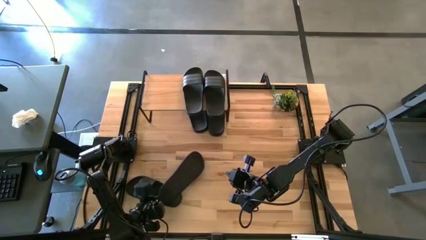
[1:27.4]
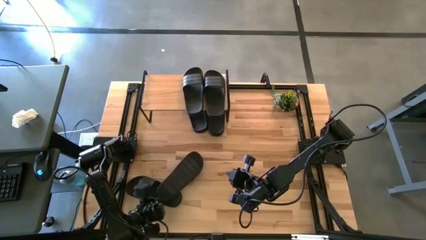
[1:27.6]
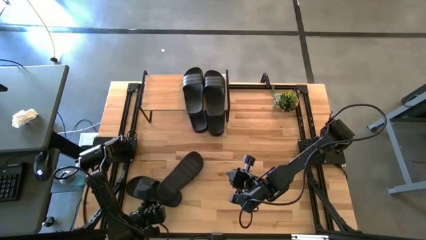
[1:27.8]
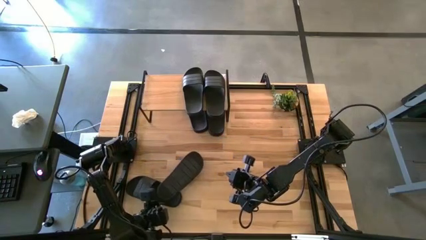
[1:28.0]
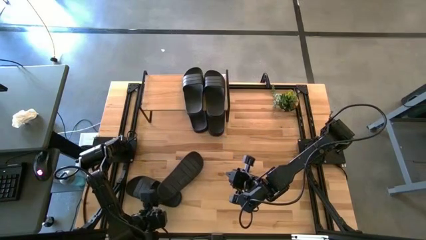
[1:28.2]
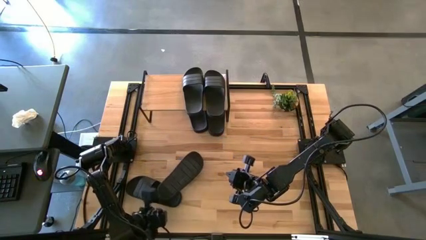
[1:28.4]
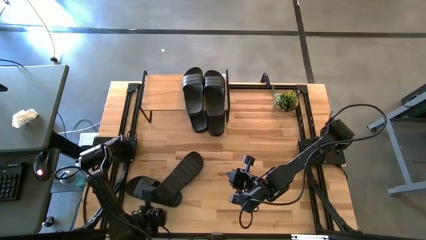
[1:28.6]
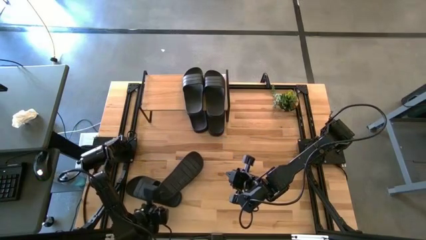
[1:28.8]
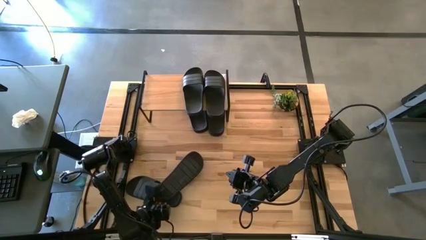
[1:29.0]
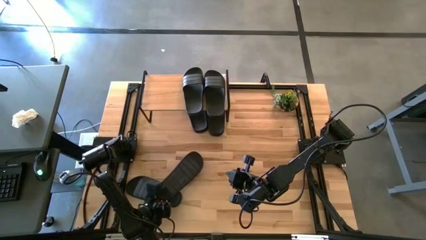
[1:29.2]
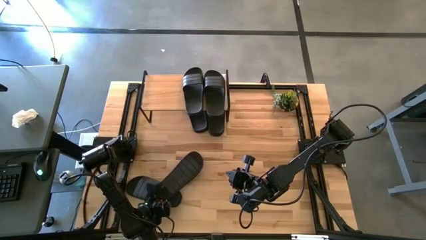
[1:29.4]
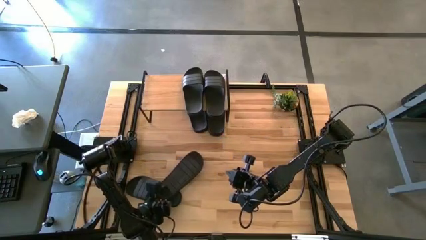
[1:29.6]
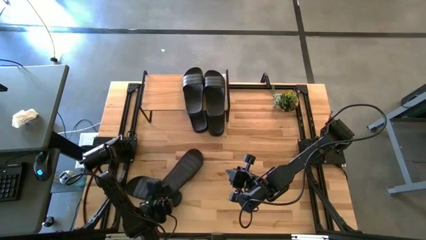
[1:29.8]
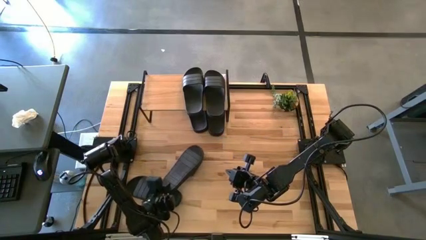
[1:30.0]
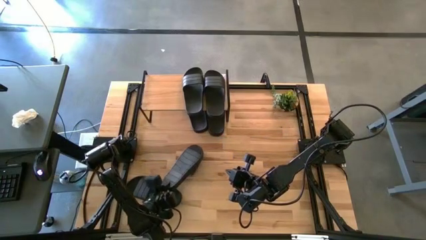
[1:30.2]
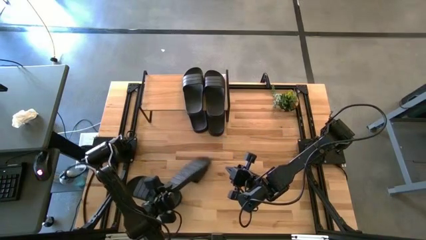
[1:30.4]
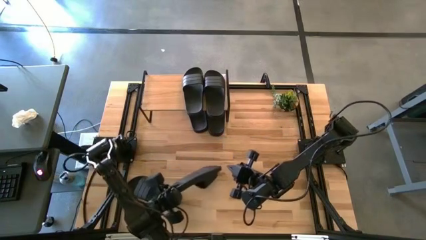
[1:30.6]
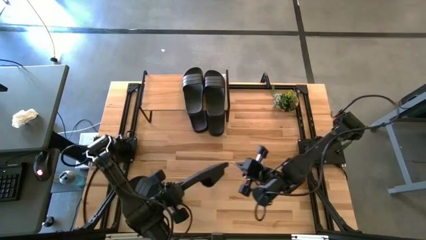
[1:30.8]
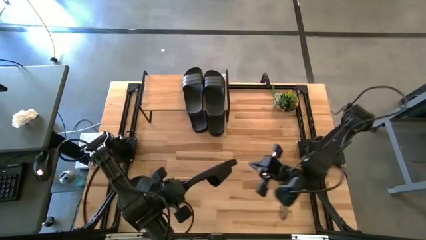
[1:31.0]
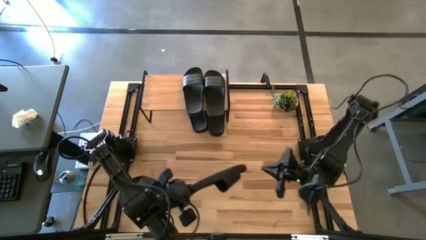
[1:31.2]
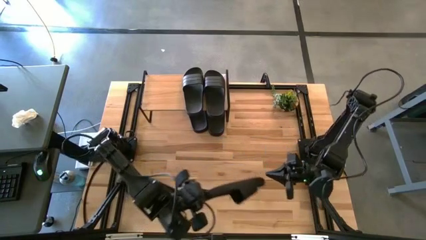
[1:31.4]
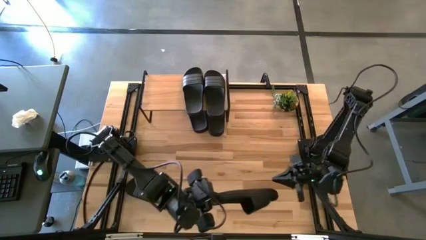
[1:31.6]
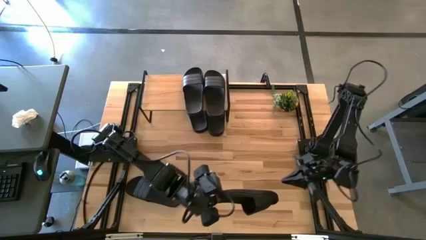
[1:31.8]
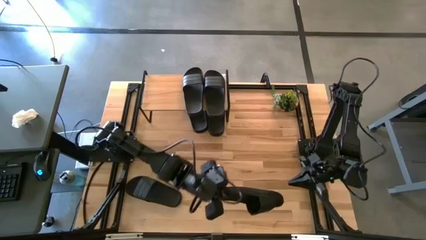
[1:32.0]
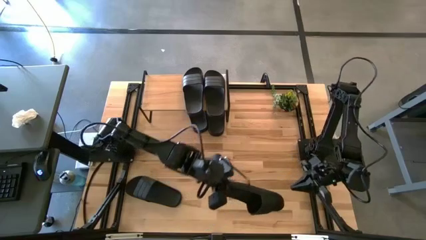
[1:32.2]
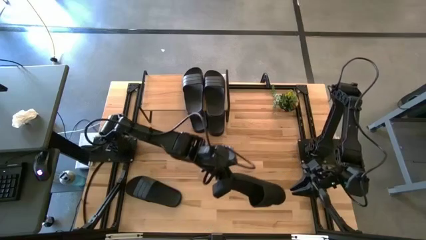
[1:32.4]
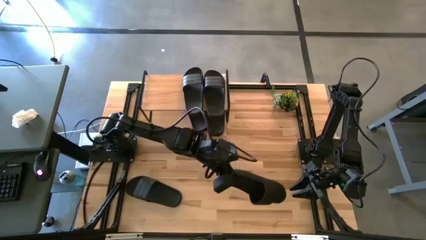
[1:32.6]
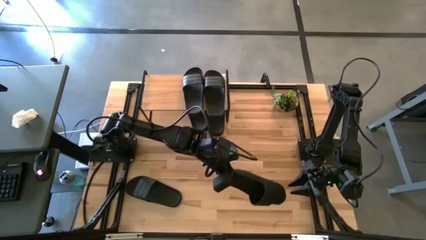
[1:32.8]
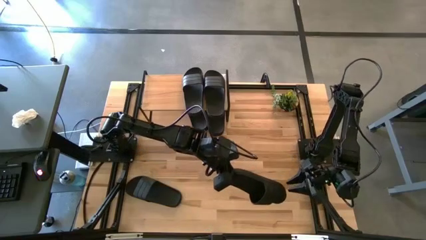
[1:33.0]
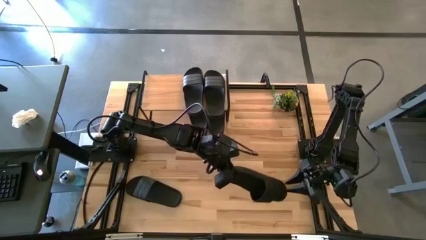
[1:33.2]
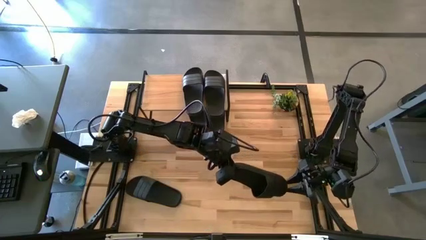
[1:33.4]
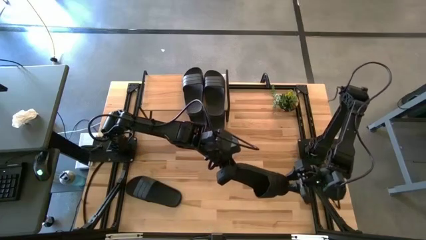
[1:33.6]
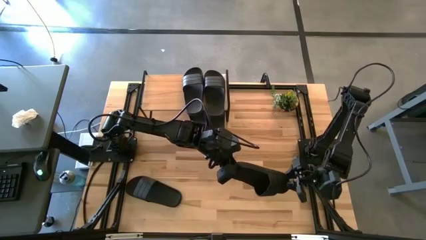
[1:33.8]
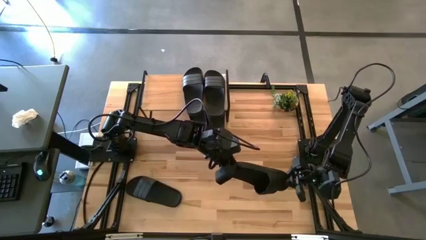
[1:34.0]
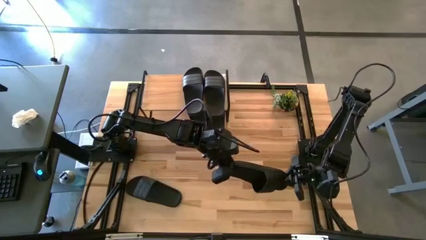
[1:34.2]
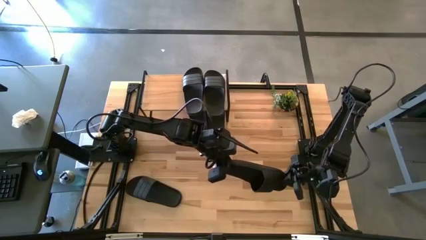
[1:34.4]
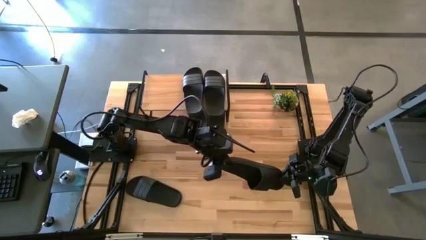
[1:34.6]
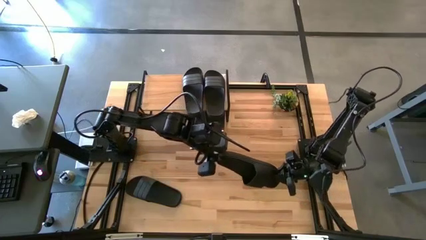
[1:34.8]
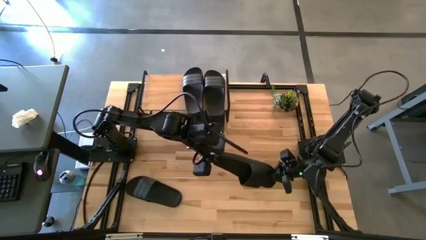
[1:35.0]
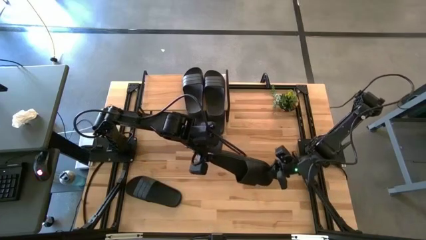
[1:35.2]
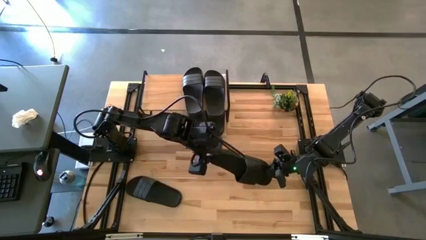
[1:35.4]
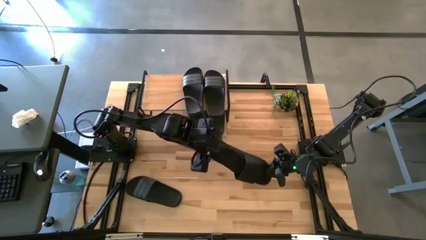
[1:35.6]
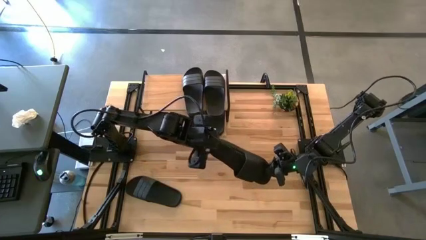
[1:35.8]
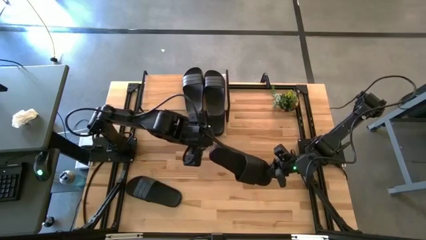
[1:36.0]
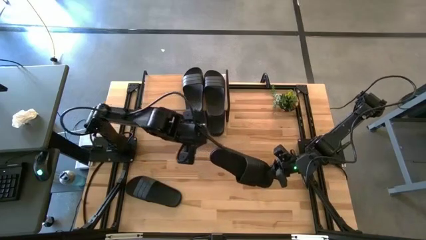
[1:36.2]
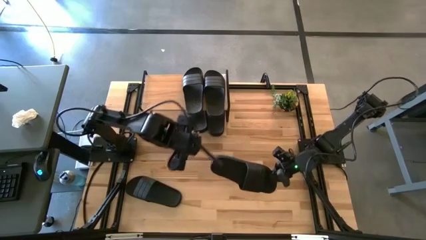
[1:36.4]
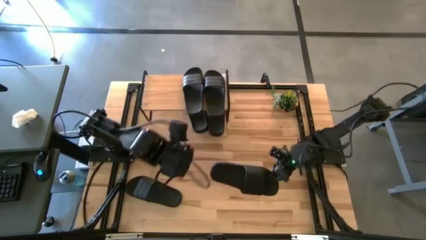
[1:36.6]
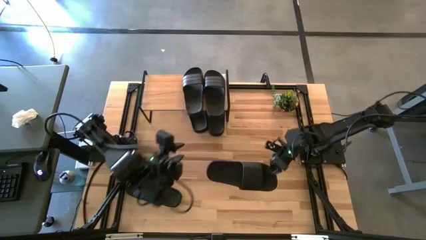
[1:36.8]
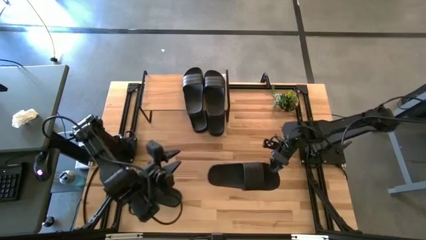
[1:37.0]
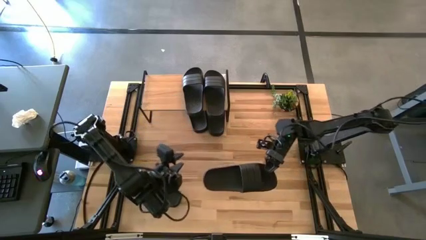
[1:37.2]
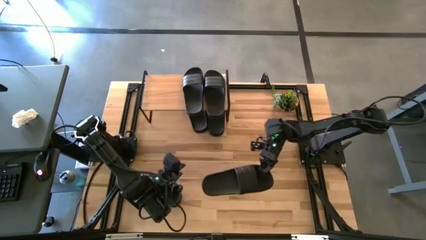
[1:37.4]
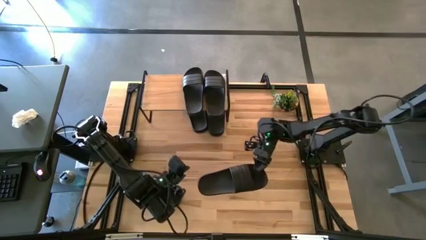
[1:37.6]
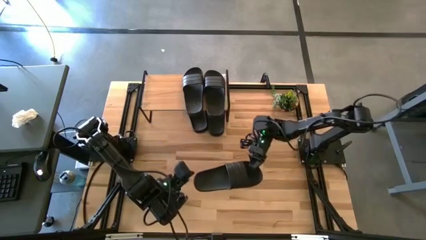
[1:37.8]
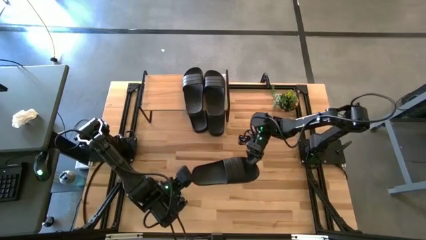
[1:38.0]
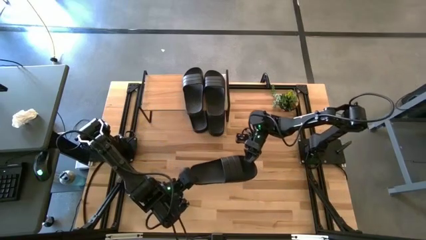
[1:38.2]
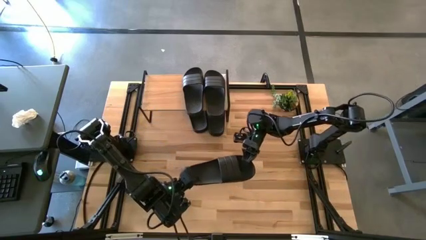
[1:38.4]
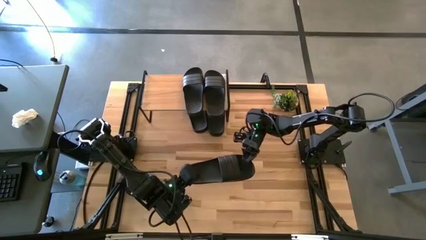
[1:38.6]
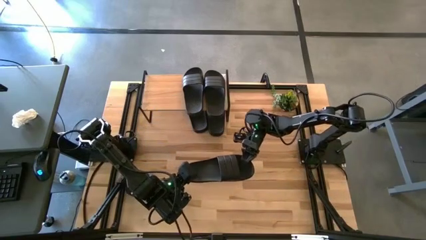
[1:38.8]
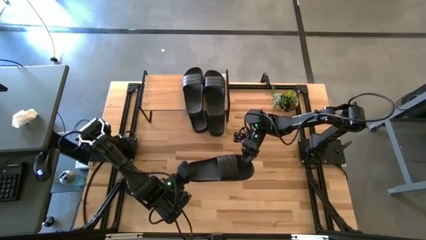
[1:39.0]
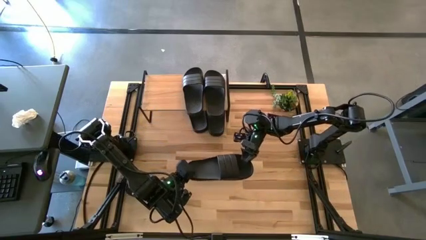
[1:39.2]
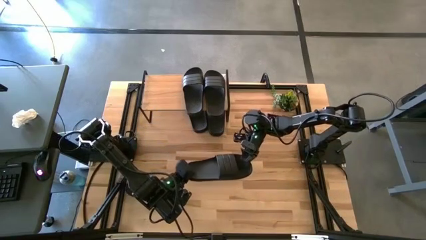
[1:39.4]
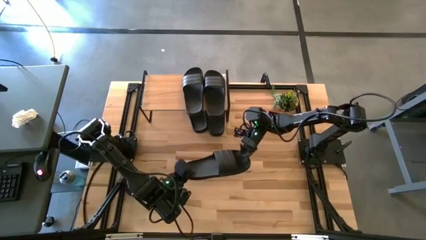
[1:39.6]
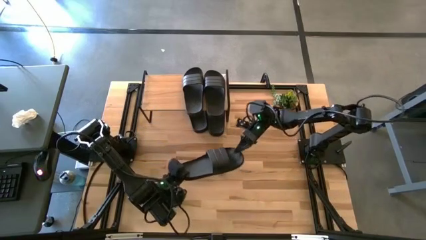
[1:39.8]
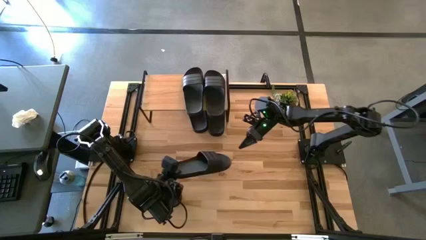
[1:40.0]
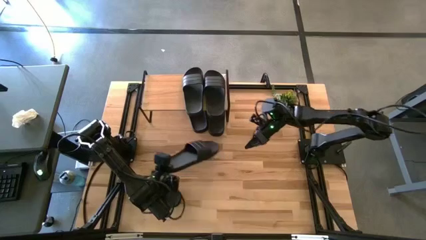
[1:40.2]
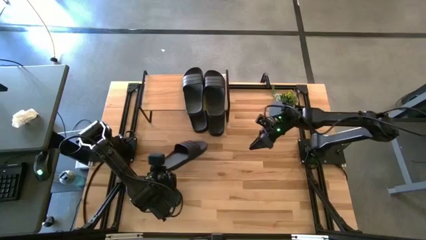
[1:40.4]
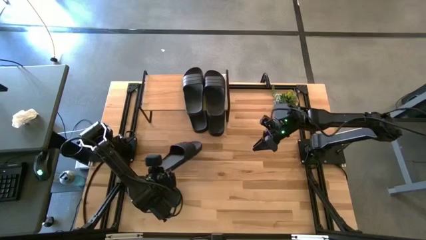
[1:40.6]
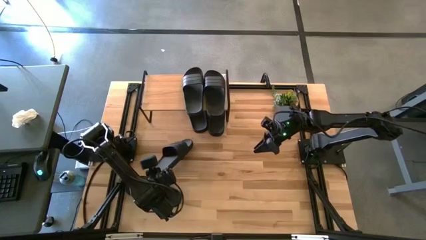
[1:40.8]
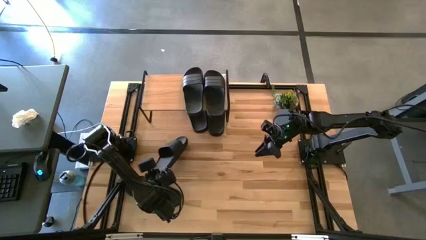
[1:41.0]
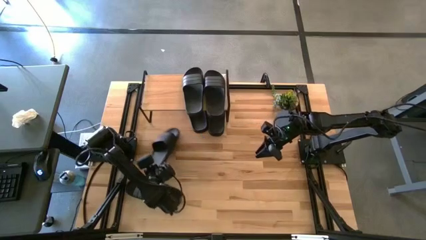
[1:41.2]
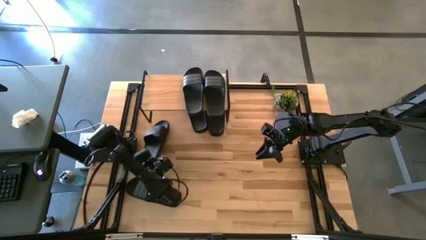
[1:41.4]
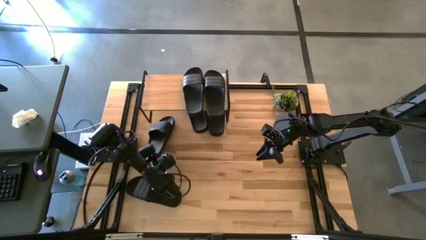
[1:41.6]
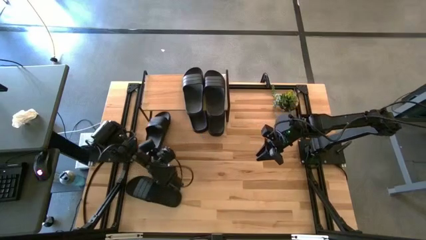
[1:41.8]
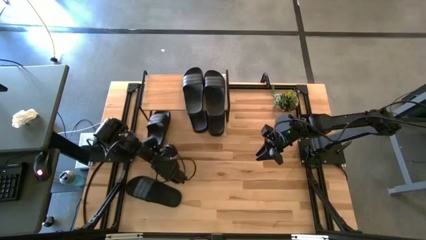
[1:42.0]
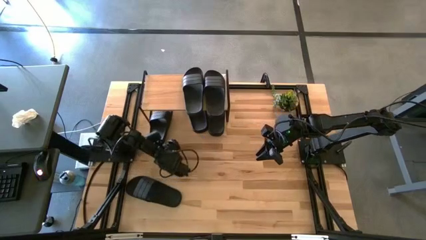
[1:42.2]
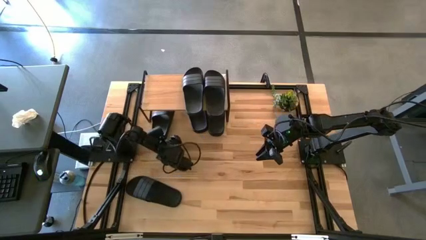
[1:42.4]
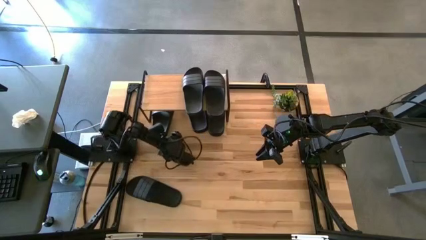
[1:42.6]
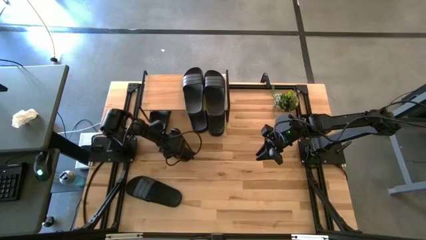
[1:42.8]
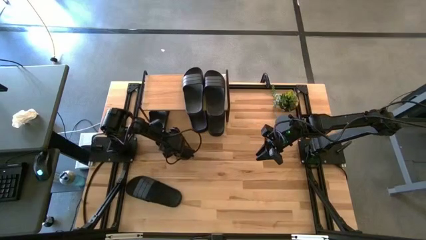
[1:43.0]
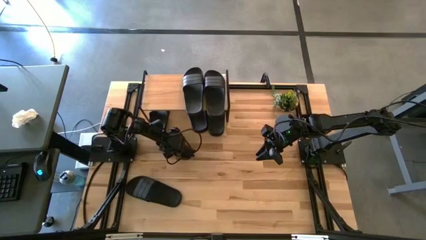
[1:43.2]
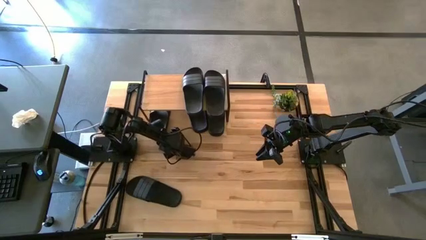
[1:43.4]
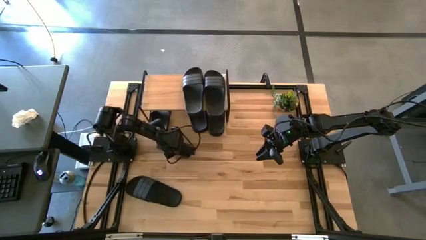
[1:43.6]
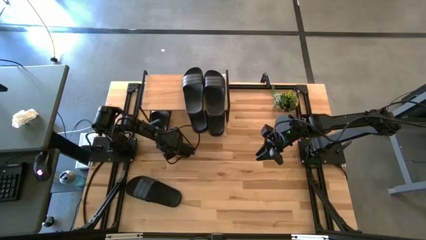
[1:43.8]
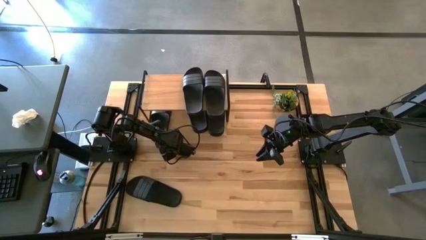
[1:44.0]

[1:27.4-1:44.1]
Task: Pick and place slides into the shelf
Put the black slipper under the shelf

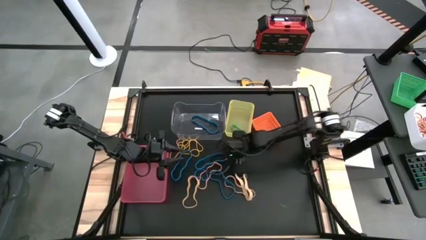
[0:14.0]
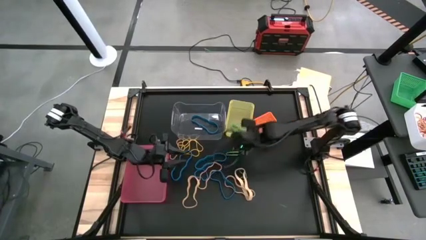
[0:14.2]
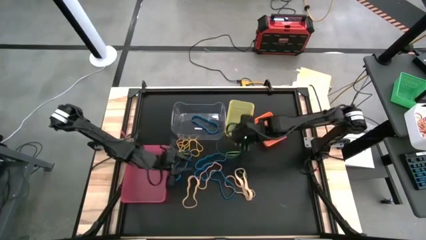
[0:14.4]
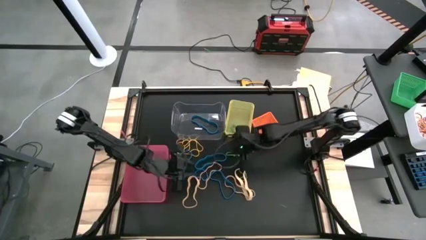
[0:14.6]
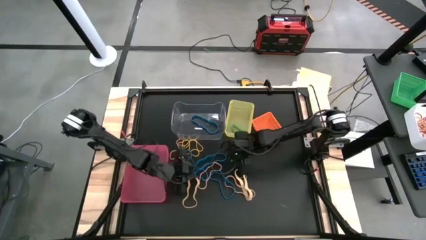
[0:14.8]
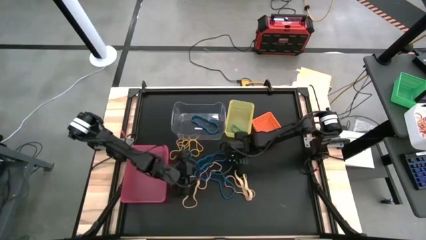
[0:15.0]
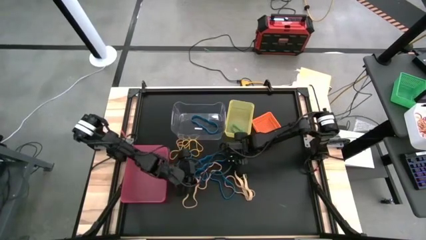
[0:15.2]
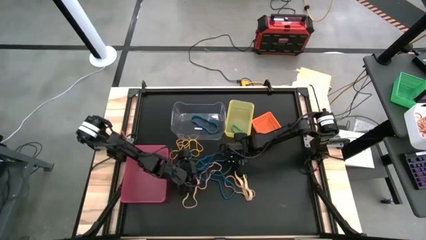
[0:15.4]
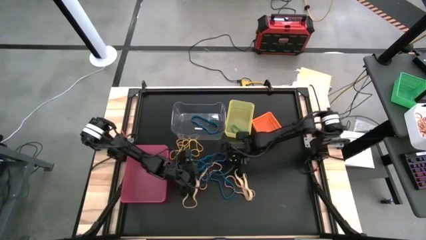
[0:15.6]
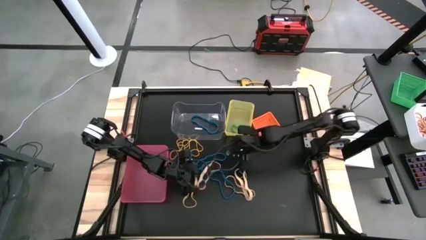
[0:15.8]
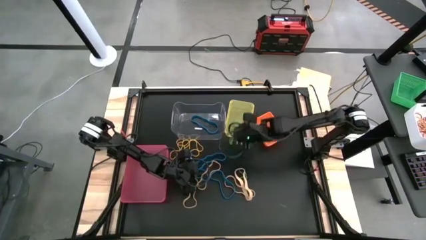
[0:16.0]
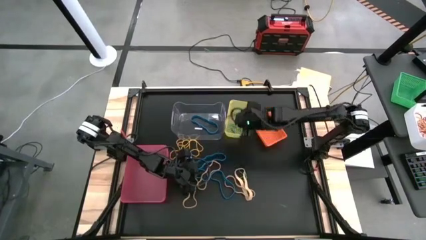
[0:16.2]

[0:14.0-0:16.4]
Task: Sort rubber bands into baskets
Put the green rubber band into the yellow bin
